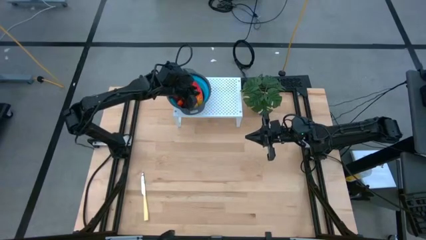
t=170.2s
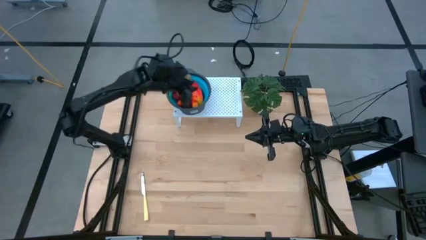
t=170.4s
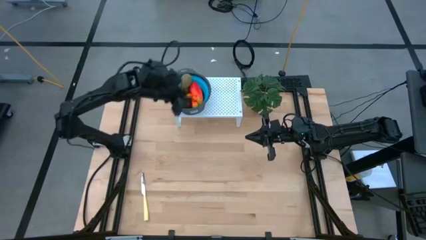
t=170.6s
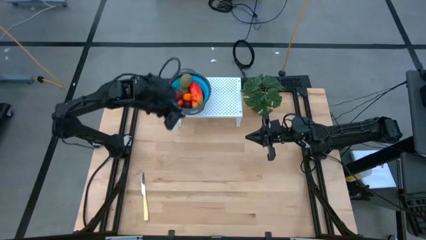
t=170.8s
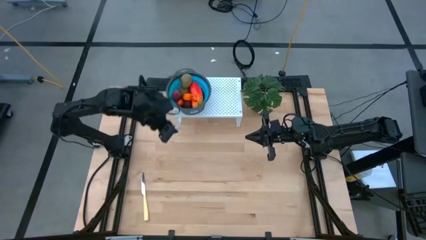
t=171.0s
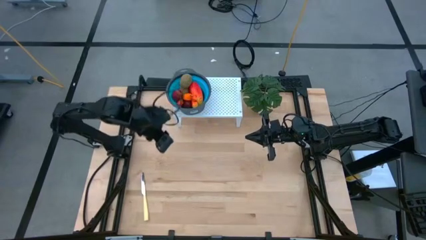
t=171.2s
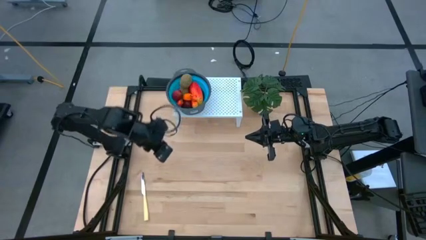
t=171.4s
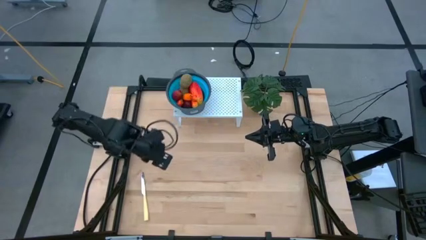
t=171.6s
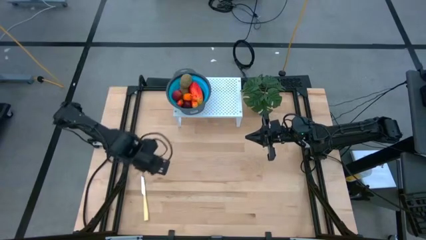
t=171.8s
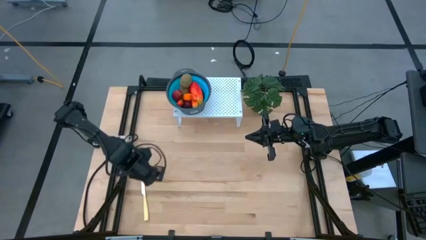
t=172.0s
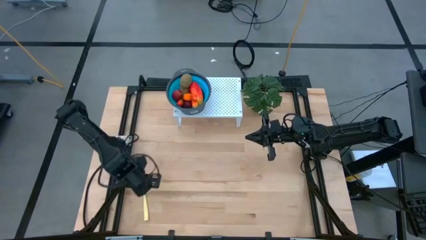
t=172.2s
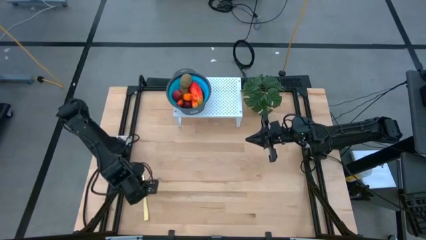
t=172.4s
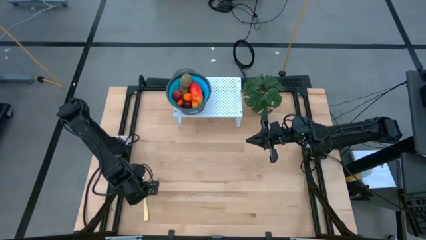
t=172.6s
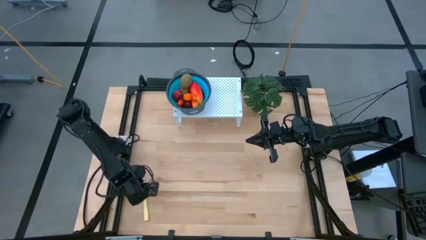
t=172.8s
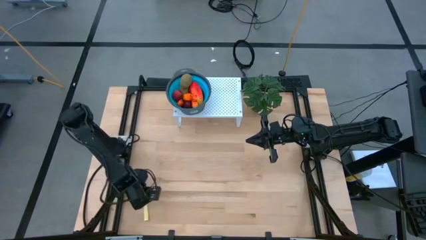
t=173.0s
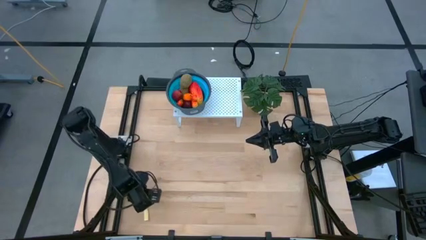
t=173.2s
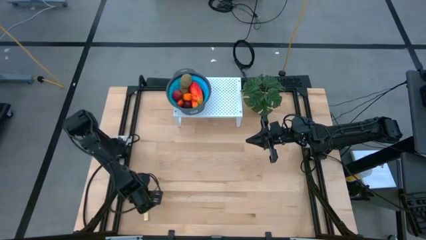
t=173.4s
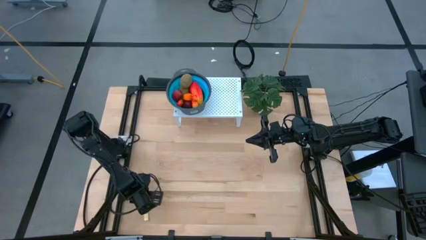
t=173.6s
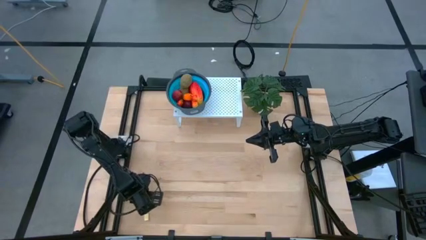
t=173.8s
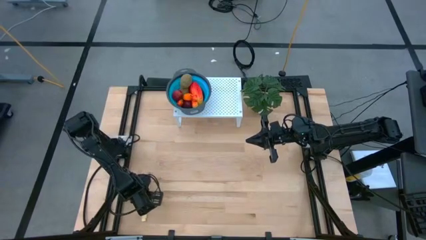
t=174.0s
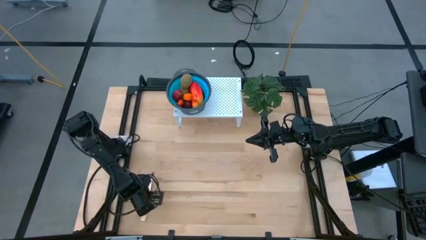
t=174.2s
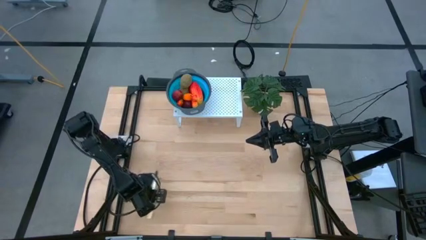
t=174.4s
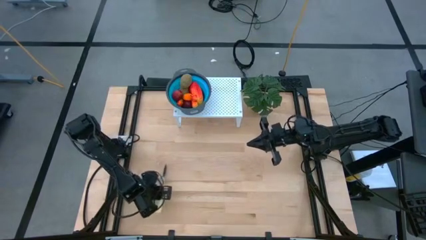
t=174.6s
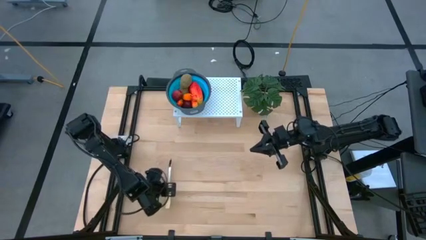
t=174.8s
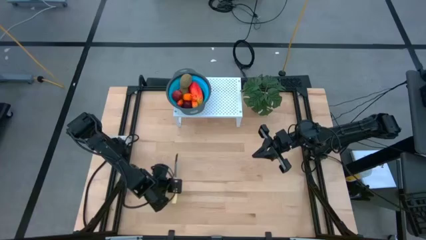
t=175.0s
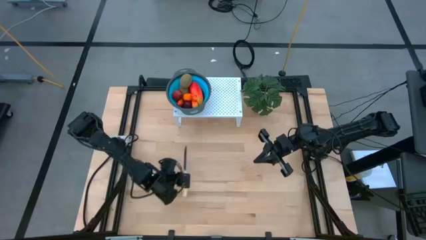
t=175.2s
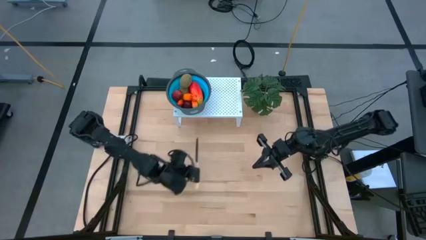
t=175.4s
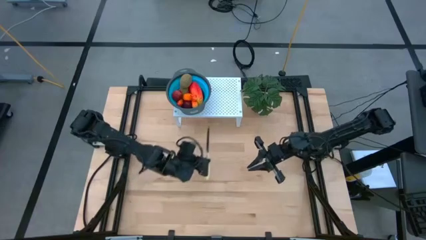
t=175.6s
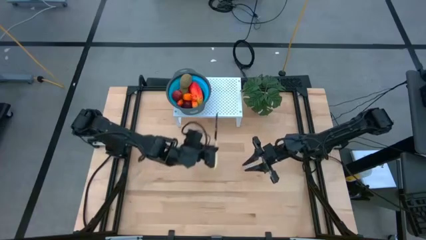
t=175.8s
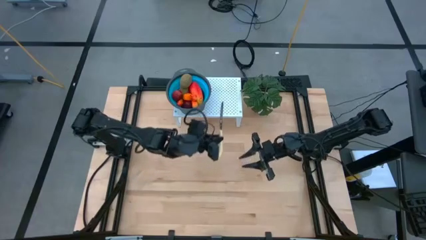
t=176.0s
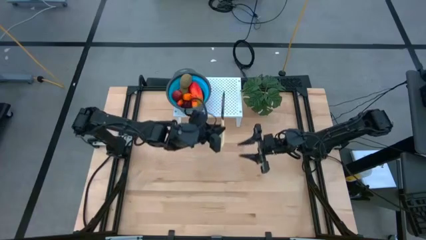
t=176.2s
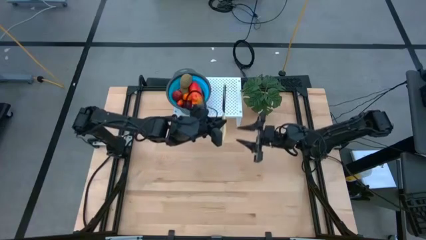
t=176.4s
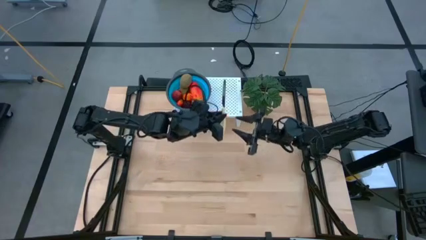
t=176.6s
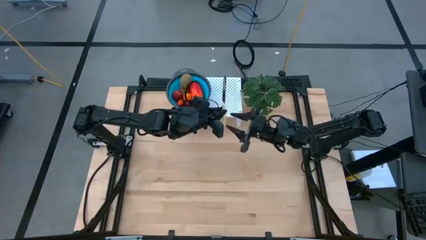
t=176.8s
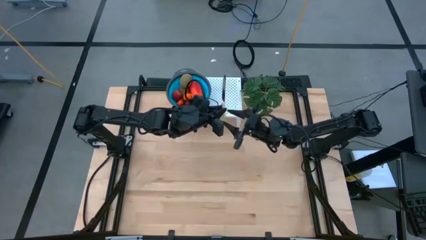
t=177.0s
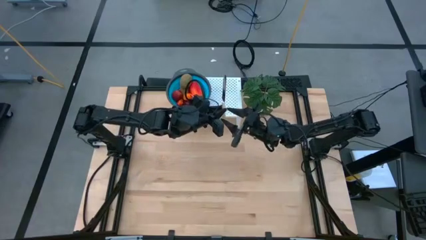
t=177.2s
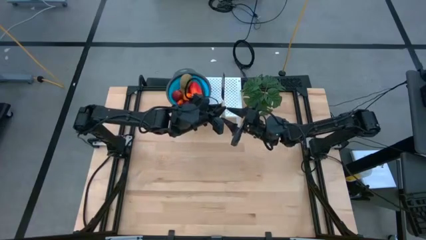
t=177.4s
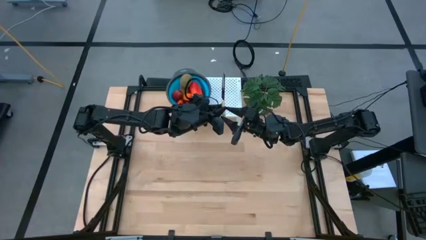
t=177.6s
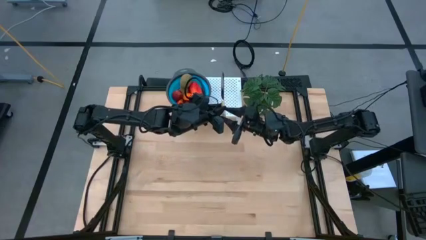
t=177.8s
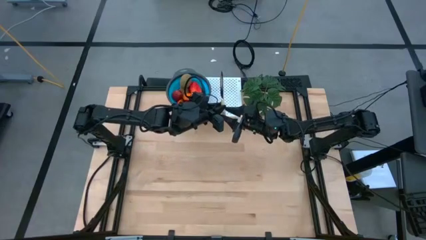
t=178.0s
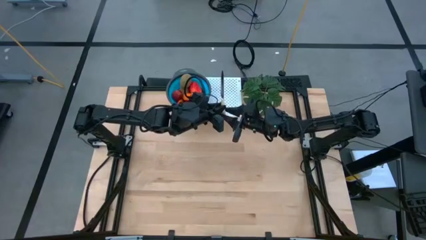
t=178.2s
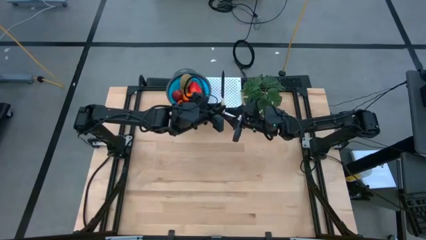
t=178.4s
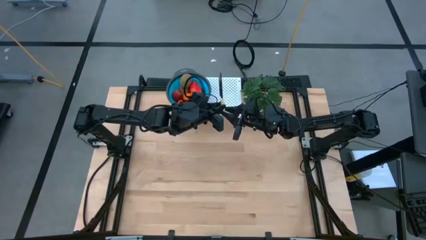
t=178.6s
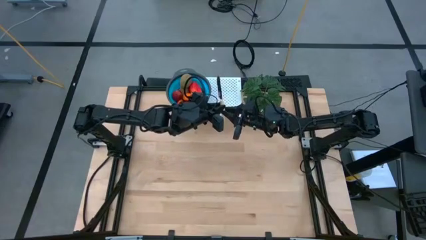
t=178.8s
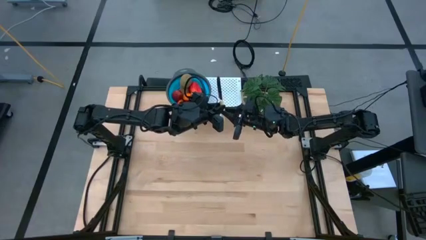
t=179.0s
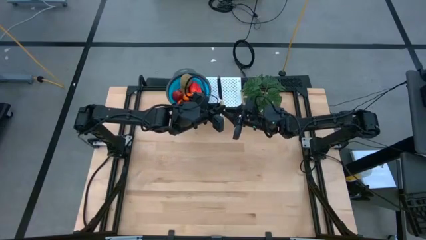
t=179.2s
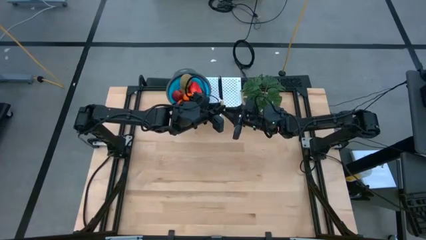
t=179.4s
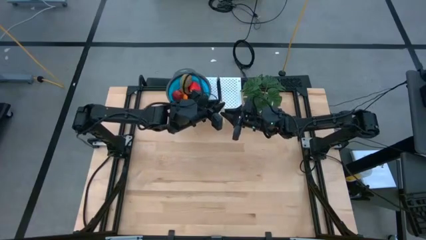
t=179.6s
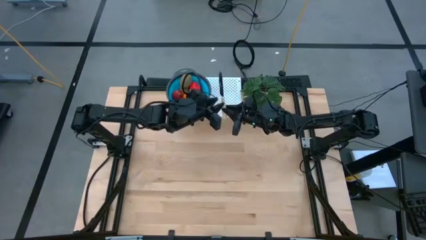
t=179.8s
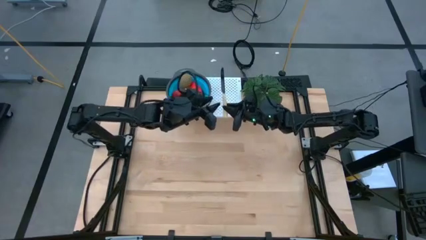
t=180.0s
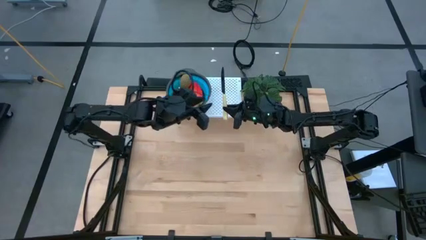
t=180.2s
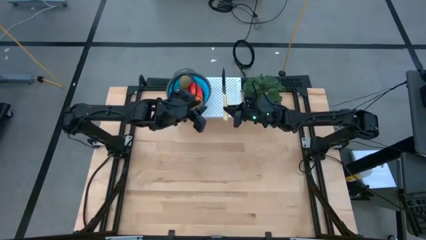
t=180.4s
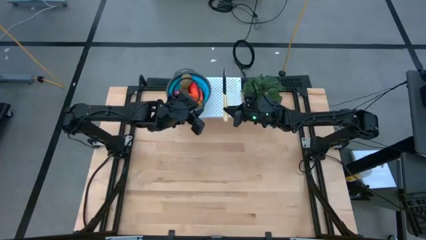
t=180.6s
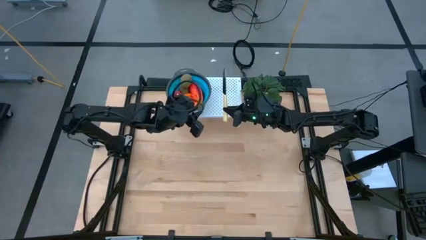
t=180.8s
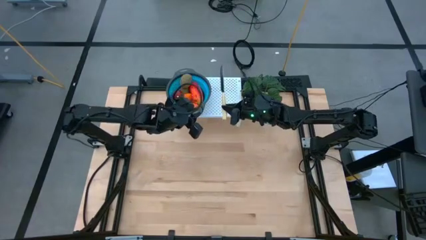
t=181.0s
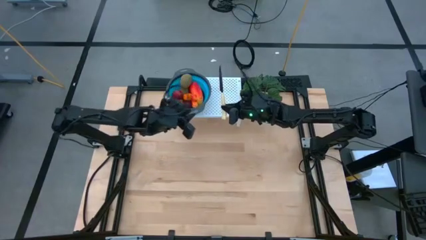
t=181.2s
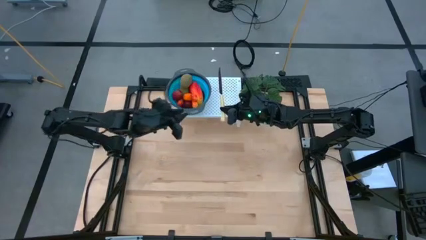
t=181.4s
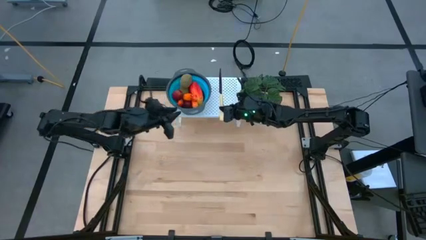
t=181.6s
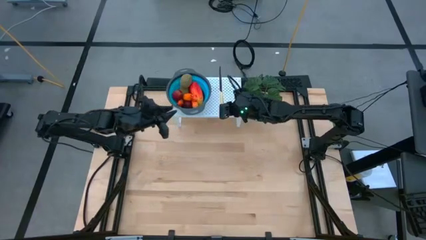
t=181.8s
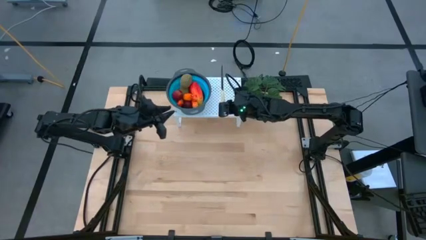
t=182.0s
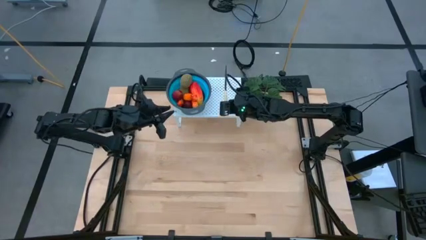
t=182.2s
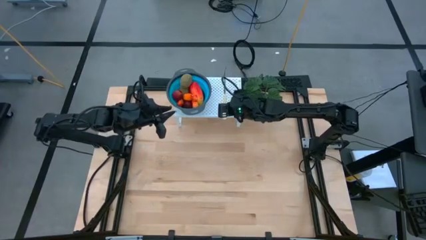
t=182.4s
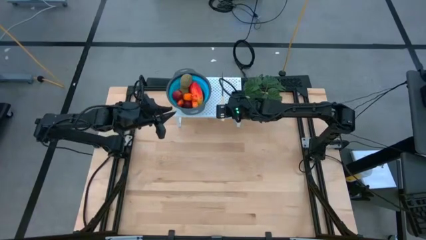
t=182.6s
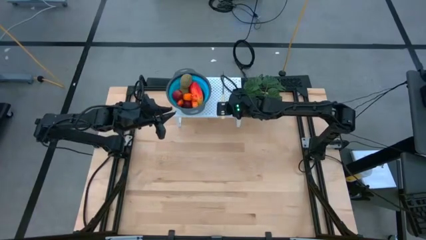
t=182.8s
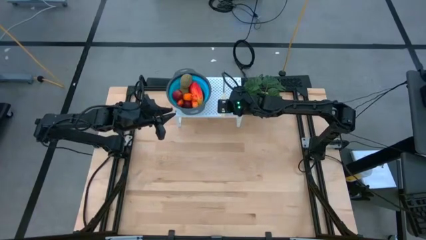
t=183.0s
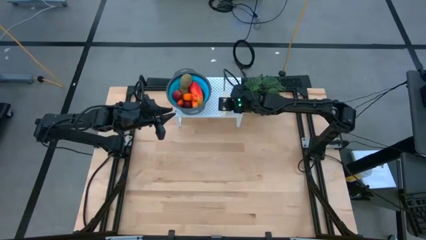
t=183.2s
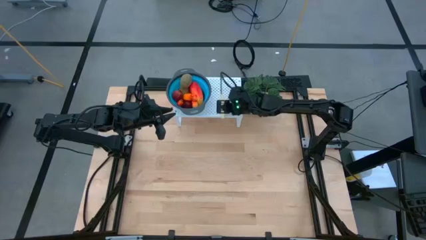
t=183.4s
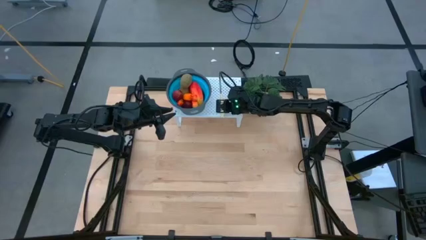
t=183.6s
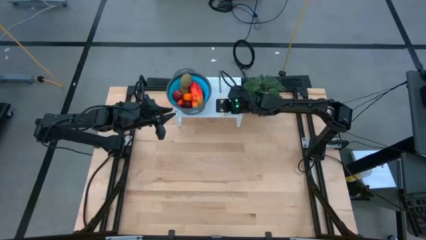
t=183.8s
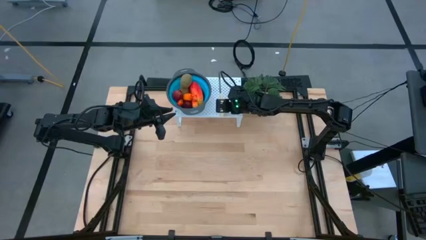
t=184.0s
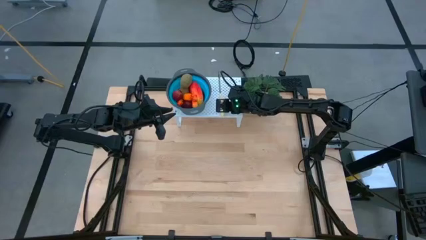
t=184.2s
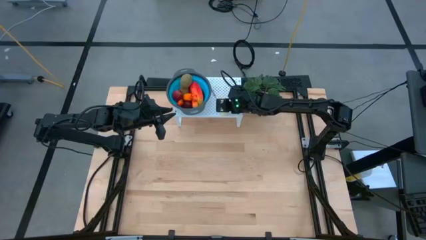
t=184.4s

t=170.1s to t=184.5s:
Task: Pick & Place Fruit
Put the table knife on the shelf

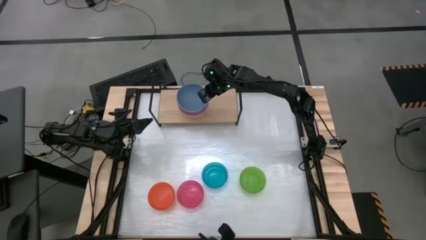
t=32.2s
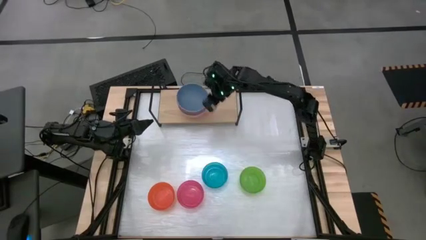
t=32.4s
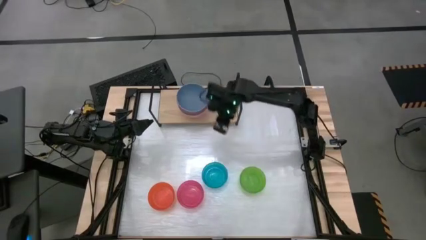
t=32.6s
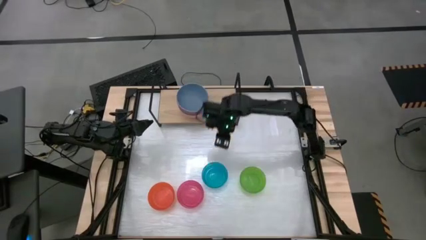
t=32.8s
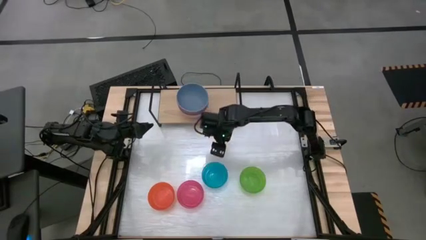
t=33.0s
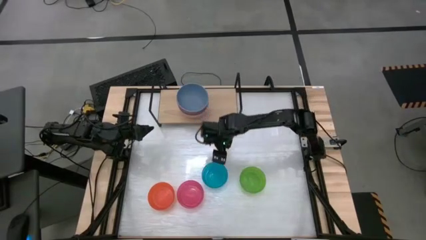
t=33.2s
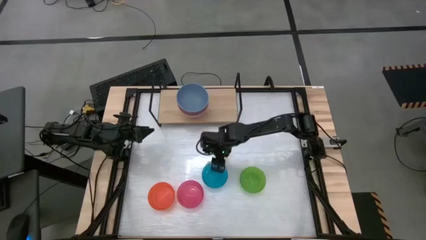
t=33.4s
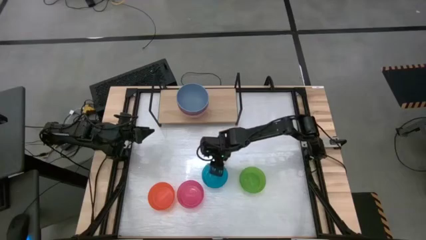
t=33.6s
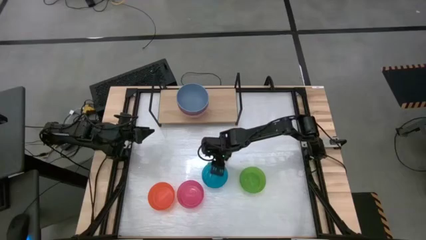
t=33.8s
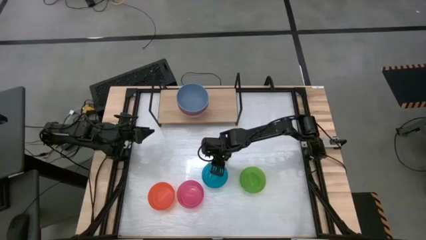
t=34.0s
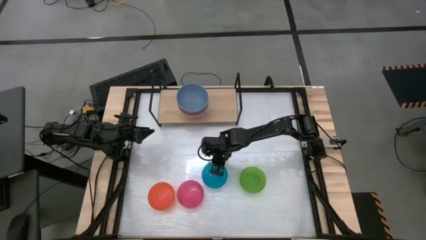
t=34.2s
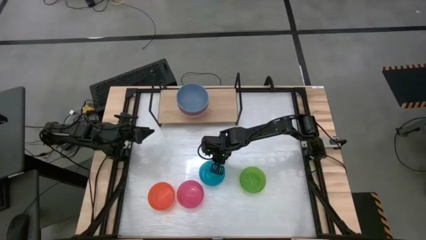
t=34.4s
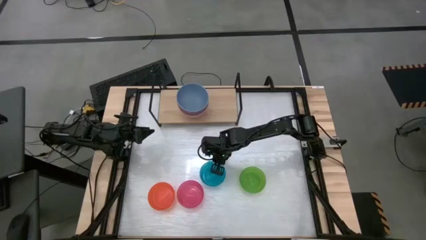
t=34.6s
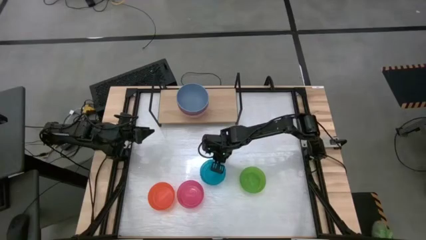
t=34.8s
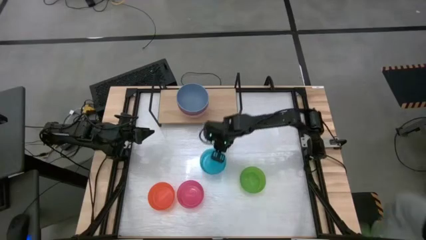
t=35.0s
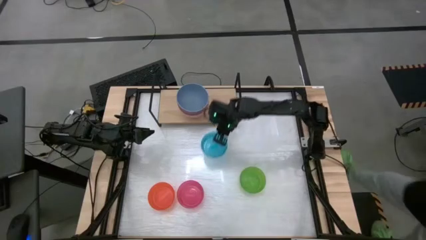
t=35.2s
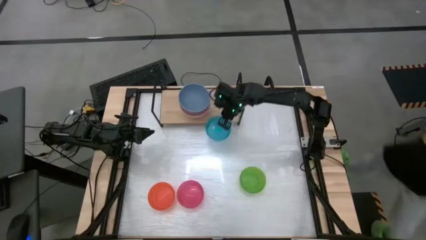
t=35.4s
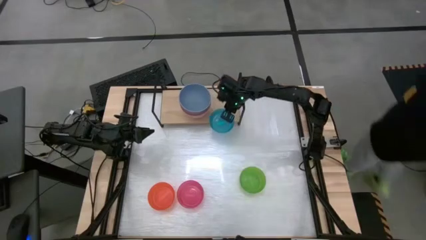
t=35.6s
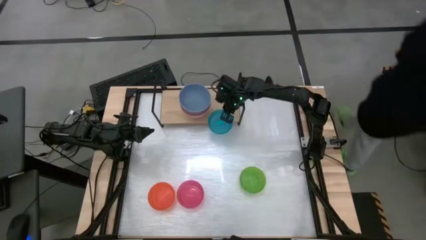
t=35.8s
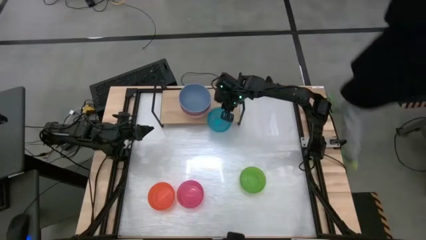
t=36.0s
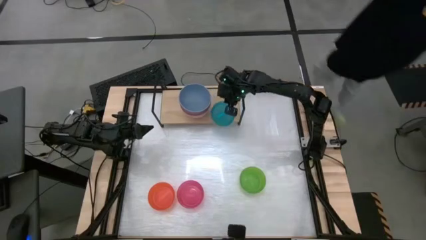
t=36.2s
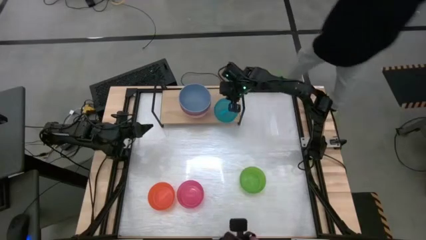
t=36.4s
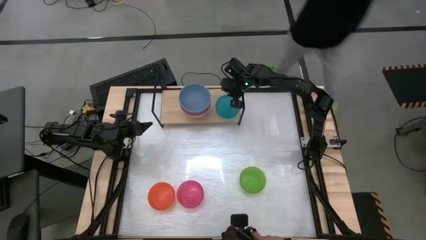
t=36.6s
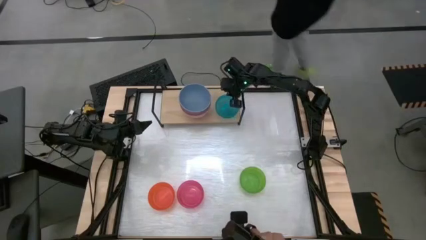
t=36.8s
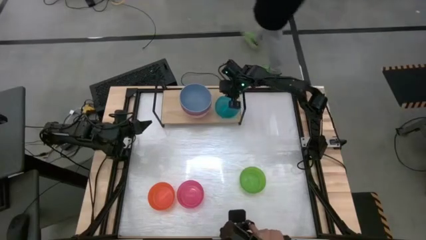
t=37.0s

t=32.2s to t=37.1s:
Task: Place and stack bowls onto a shelf
Put the light blue bowl on the shelf
